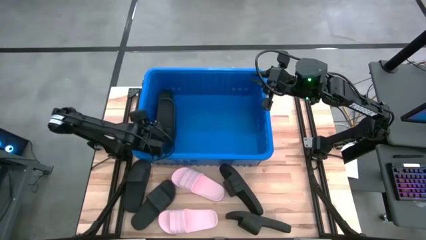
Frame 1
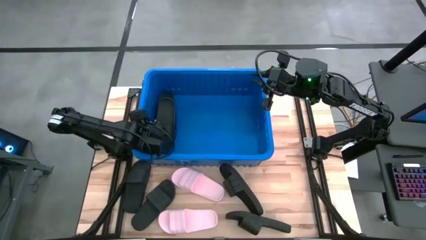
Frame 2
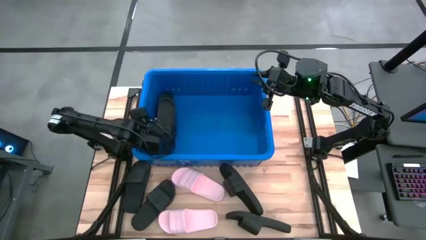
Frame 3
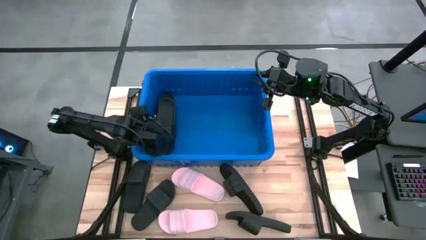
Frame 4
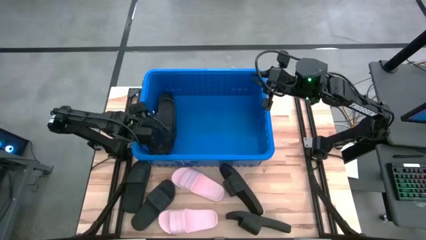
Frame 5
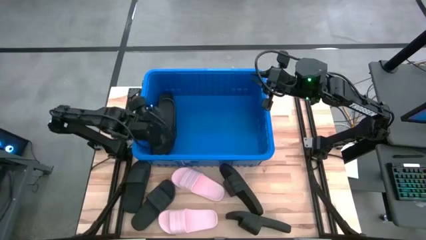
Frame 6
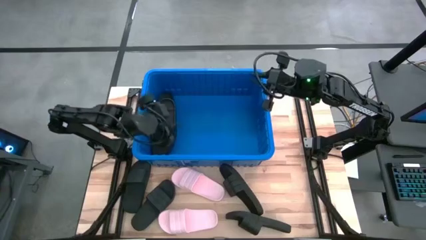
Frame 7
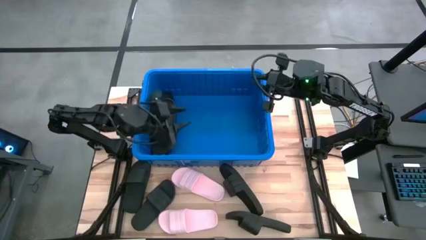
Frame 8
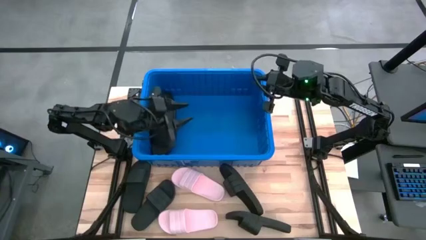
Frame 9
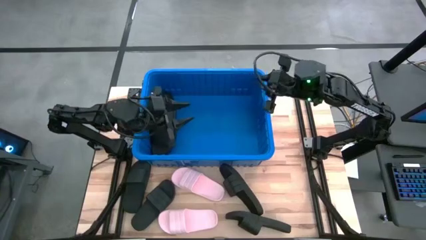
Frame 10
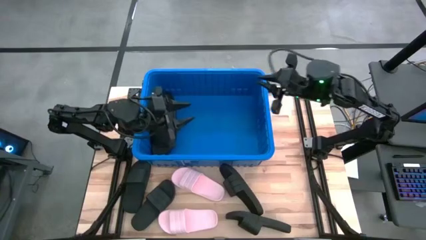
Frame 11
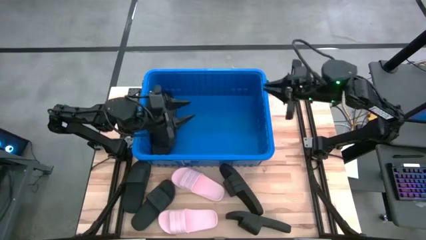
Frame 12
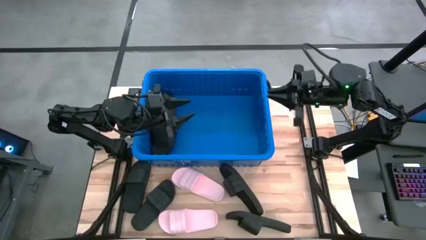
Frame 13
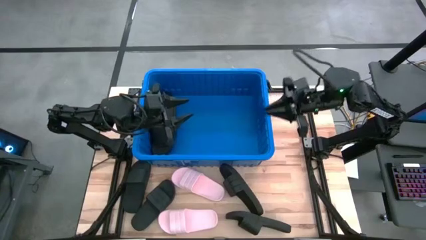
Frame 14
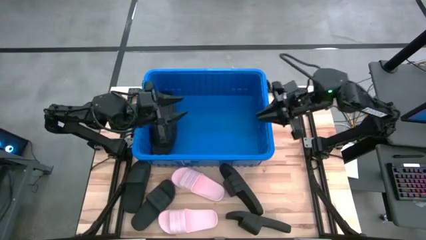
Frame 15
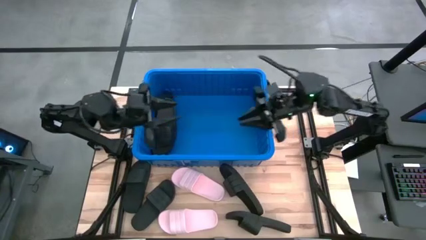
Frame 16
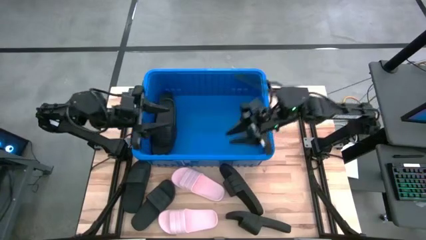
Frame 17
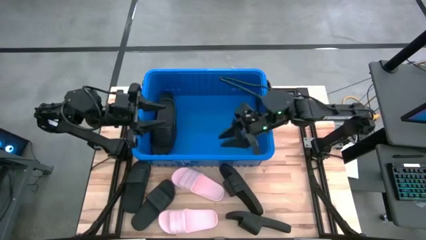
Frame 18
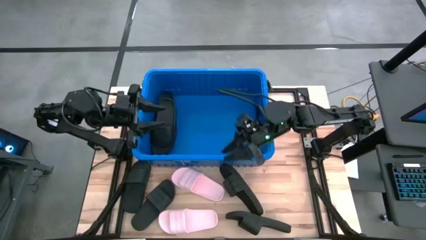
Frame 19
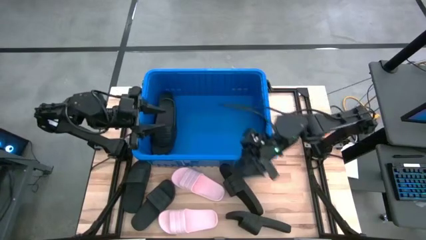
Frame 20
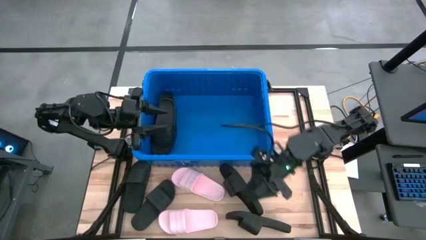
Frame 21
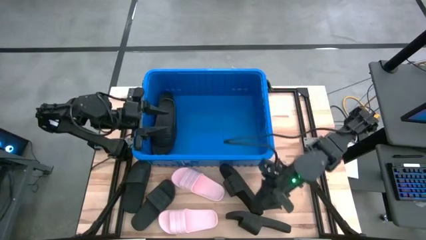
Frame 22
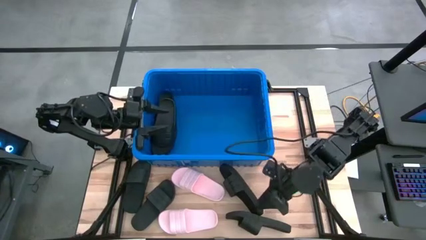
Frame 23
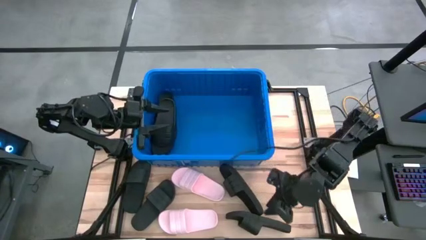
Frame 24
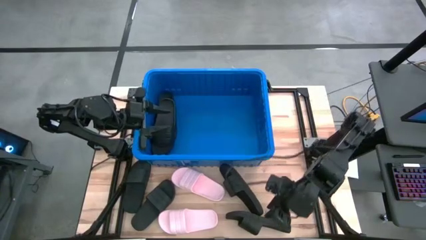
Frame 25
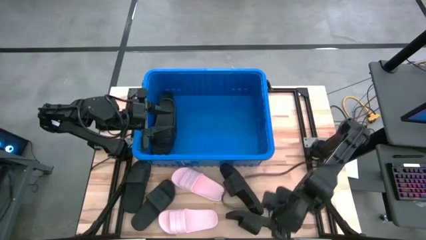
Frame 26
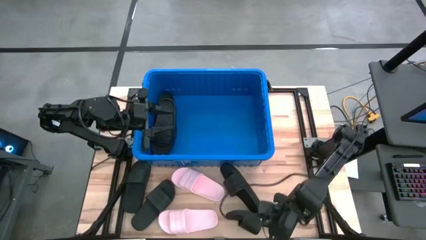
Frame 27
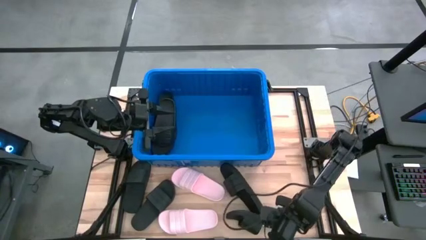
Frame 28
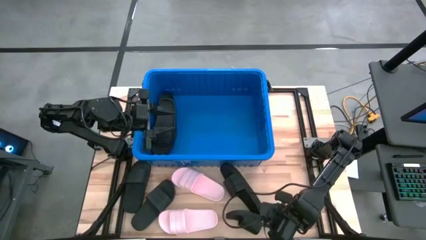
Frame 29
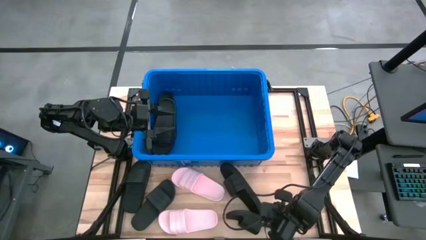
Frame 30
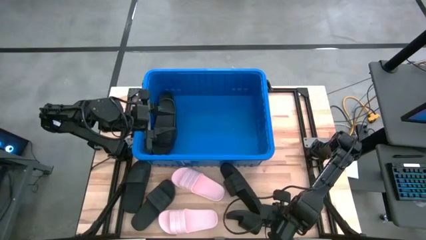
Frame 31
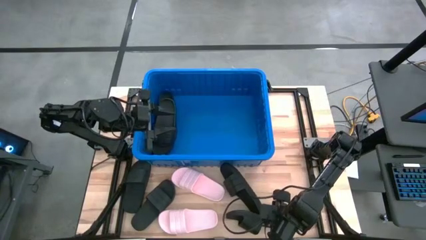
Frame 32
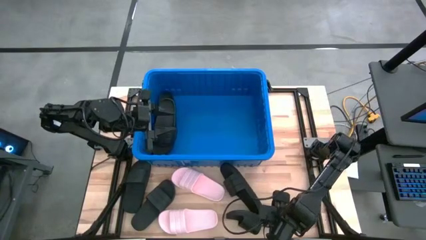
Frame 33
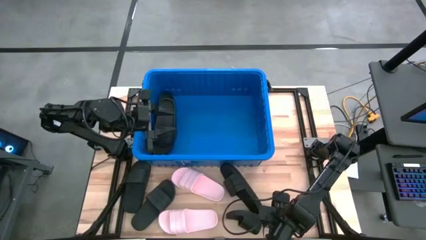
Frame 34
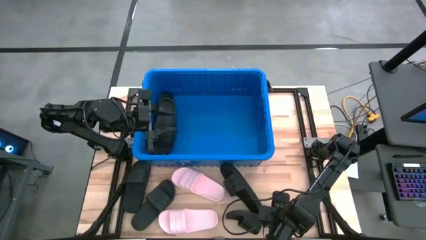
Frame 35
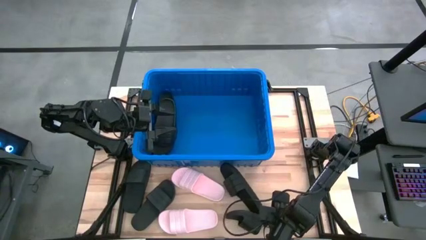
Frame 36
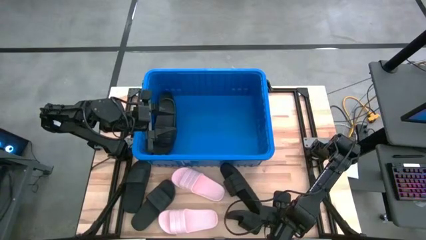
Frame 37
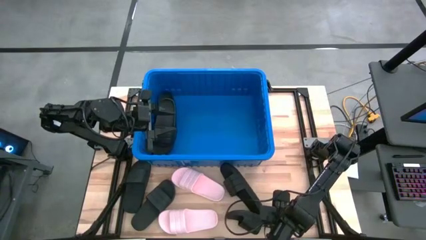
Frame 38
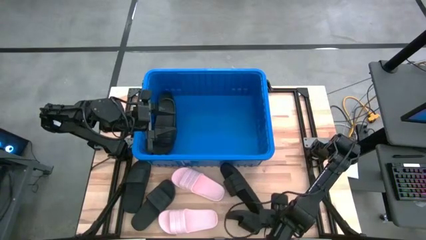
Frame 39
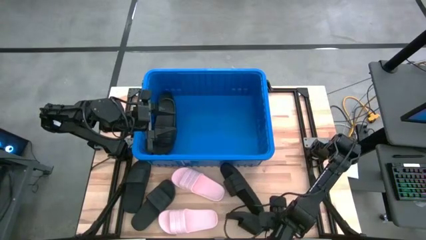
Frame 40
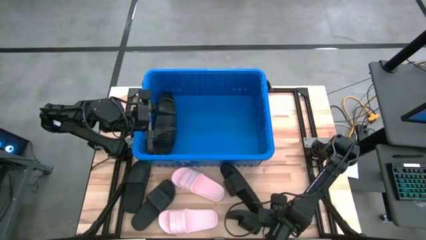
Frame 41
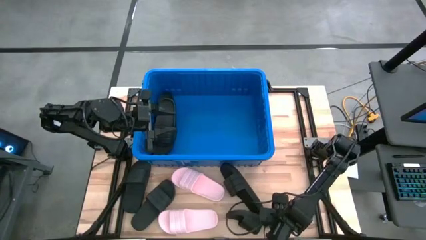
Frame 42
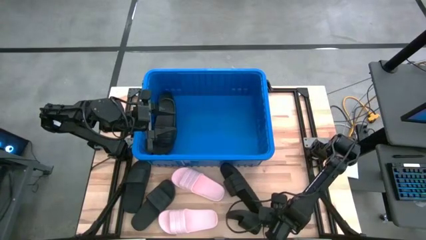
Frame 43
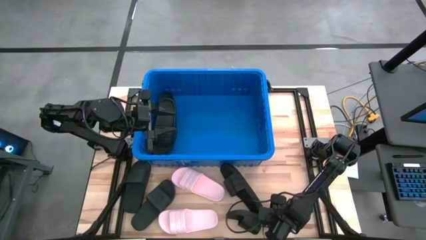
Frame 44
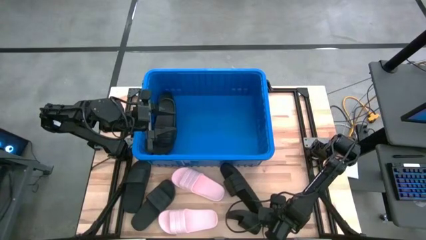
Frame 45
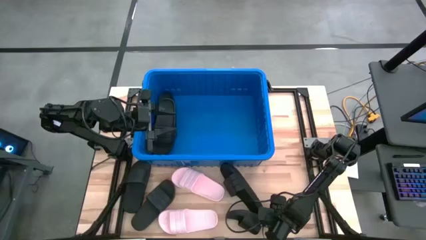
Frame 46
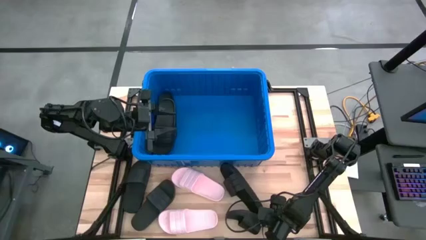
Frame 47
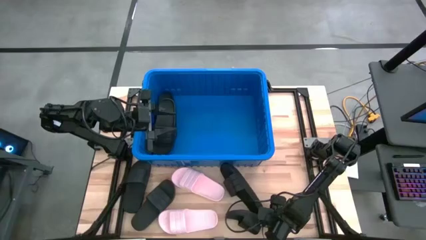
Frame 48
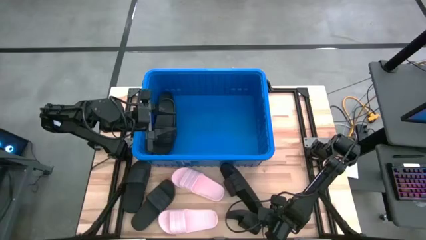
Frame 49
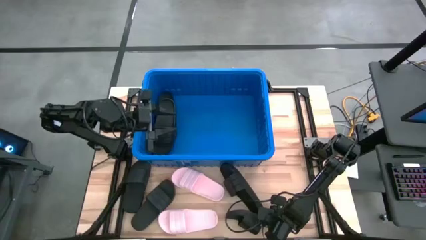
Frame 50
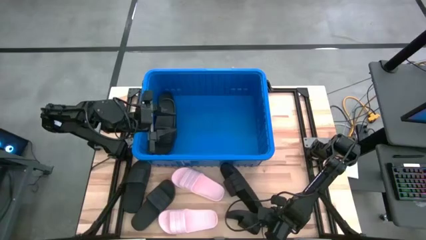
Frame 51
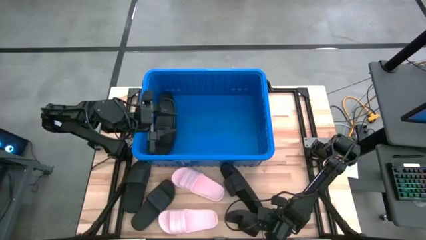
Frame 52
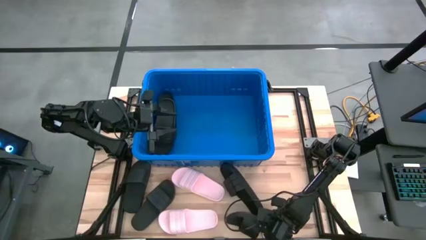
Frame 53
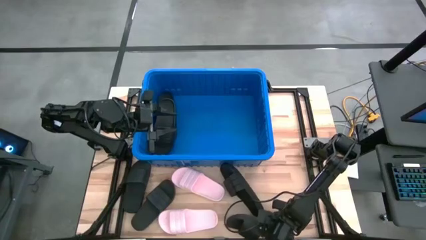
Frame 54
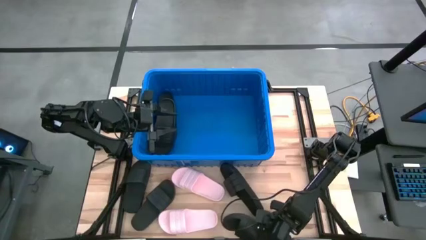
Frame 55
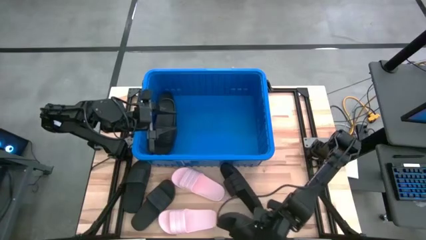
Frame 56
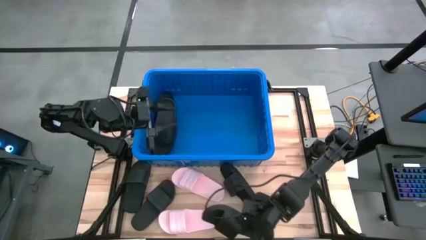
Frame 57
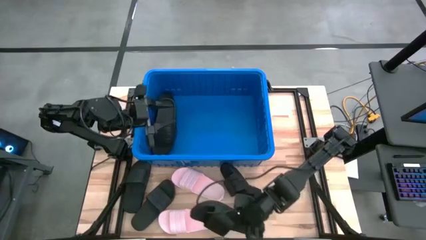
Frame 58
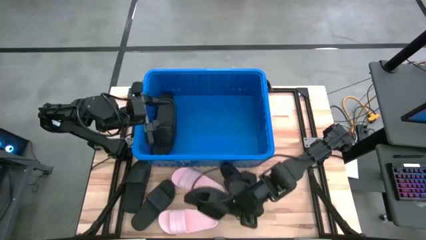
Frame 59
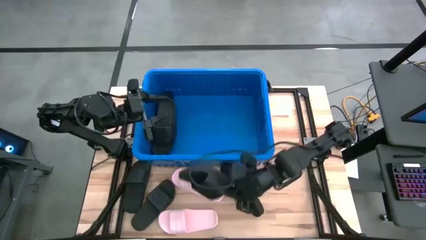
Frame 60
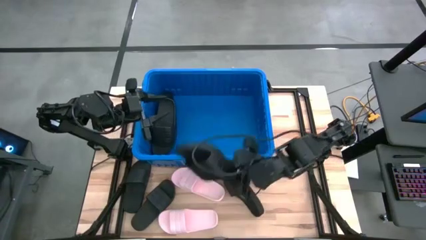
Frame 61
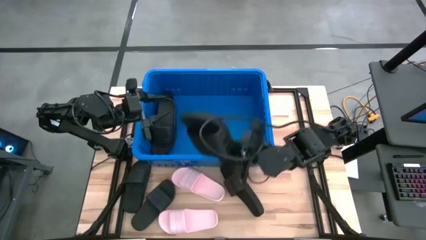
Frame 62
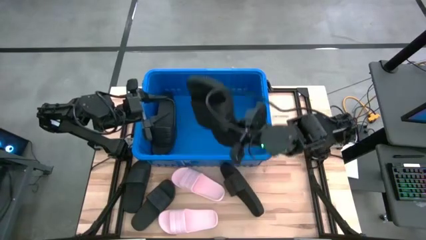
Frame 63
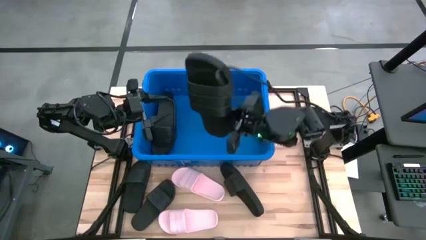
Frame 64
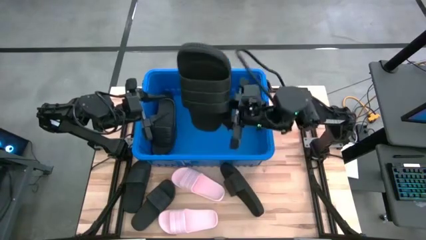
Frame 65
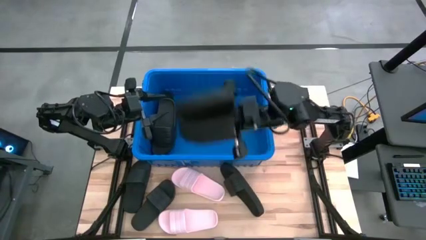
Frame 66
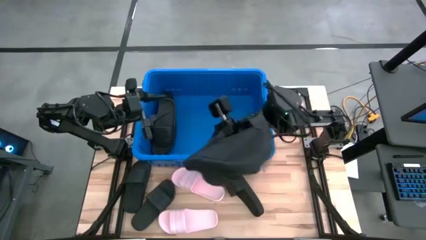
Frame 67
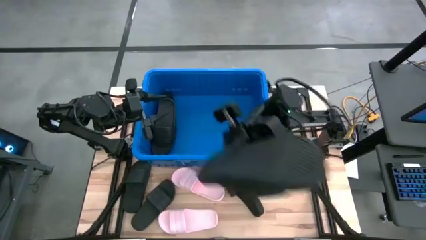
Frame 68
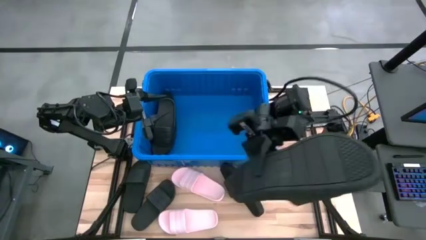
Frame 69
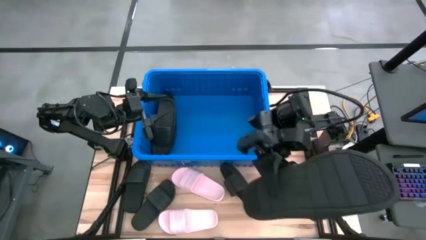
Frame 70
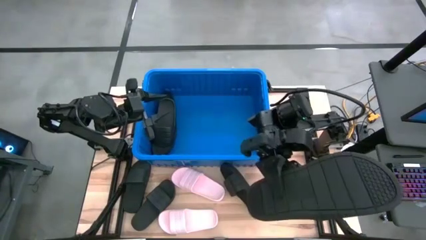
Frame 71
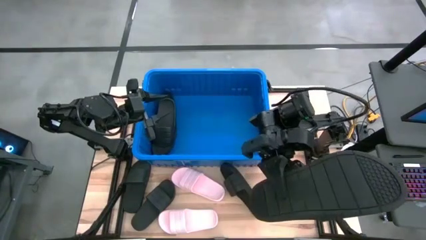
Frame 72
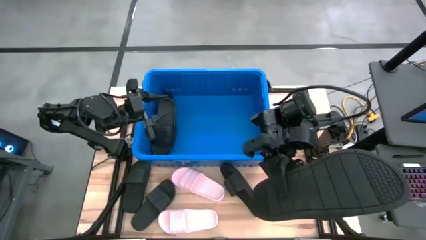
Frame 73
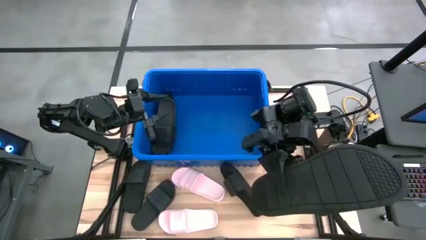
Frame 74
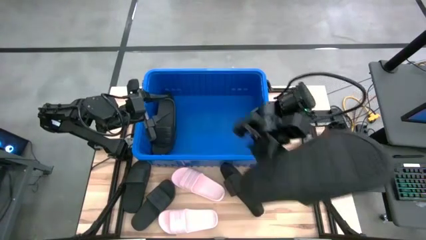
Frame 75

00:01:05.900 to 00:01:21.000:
Task: Pick and place slides into bin
Put the black slide into the blue container

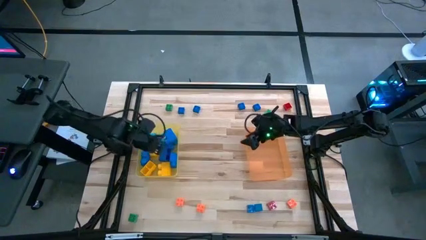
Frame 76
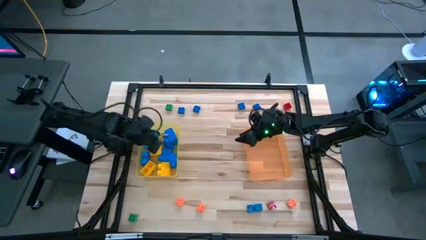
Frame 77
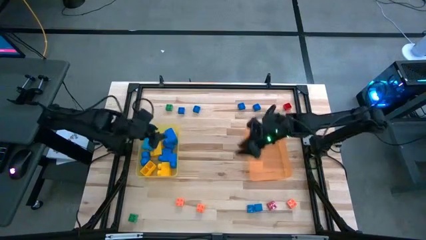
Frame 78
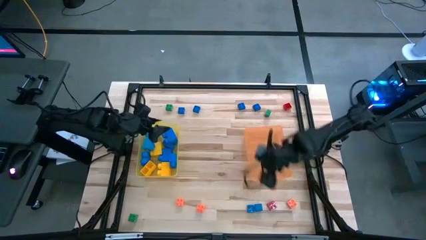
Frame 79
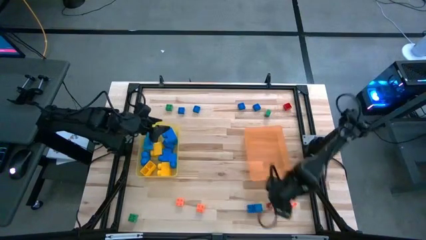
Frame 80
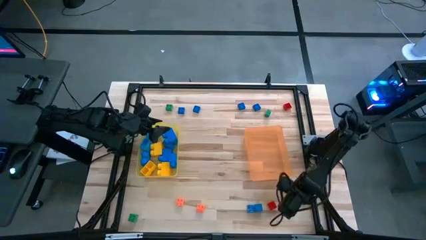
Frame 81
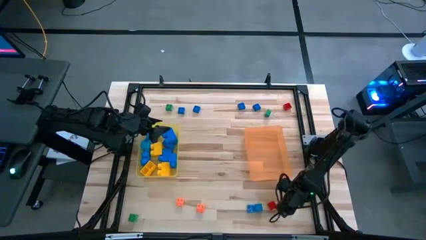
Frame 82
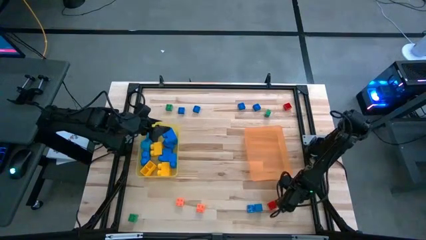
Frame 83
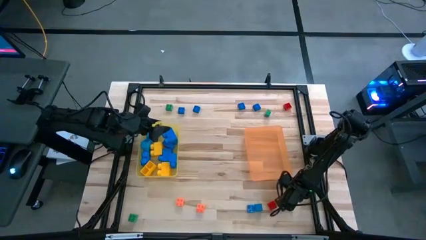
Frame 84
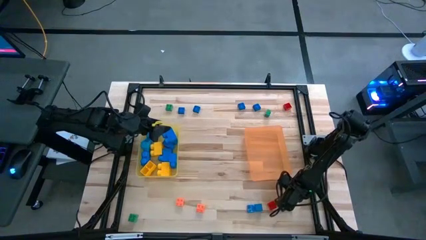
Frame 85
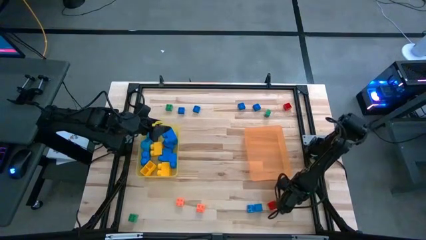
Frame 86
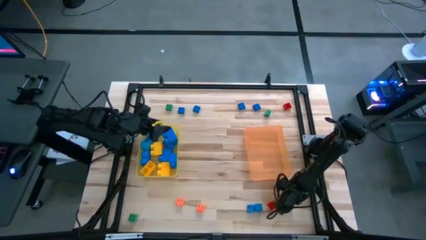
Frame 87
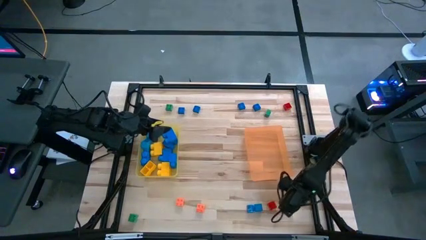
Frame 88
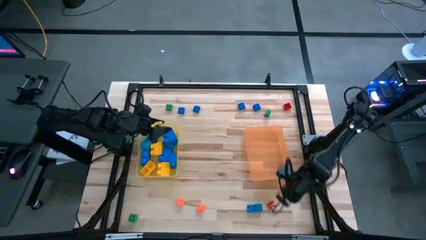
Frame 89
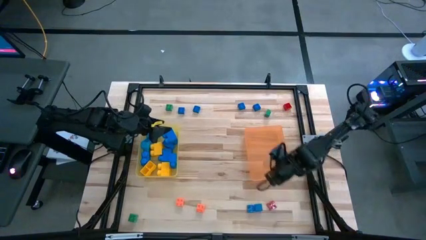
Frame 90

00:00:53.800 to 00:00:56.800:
Task: Sort blocks by size
Put the small orange game piece into the orange bin
